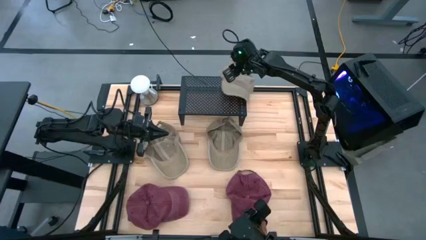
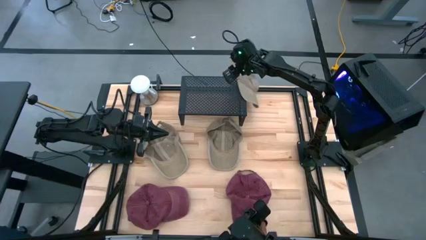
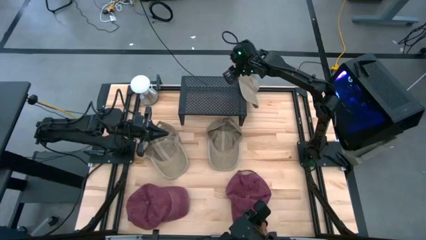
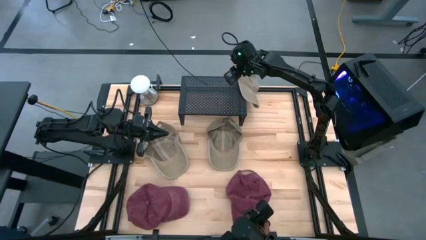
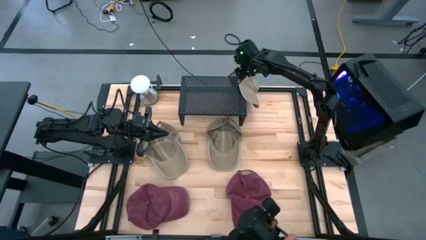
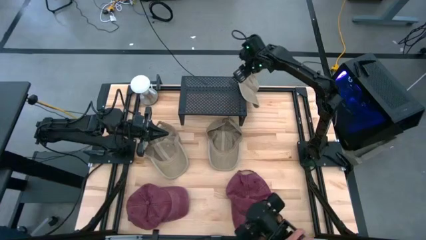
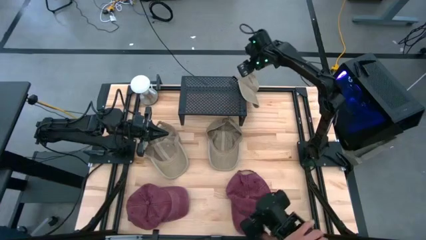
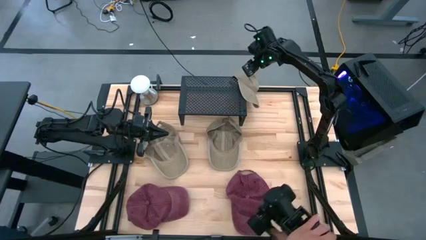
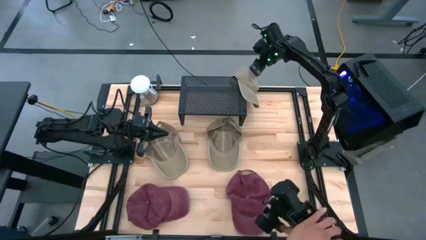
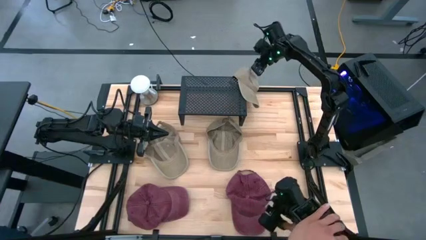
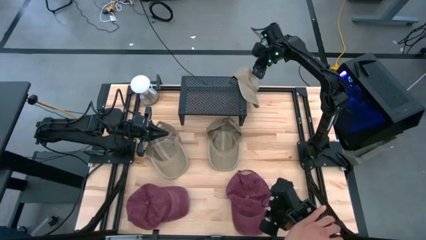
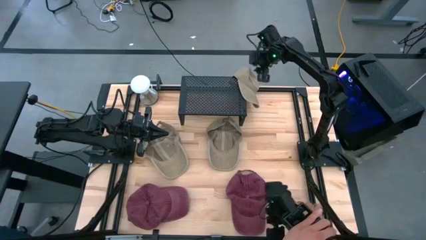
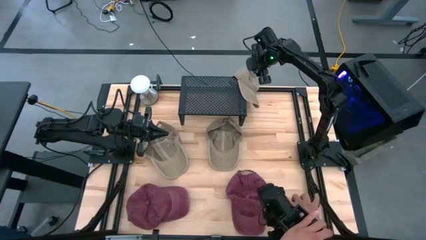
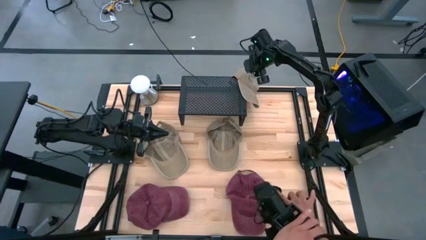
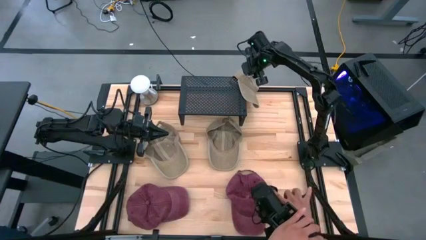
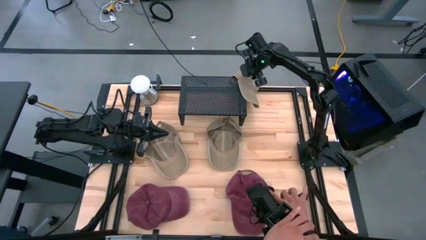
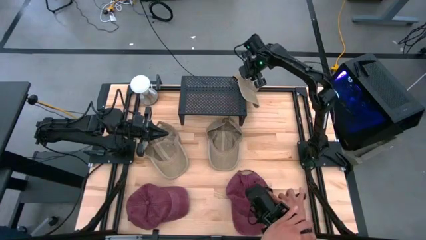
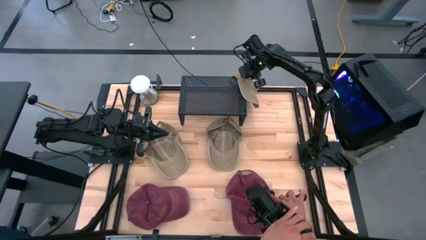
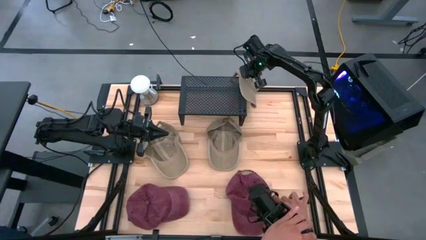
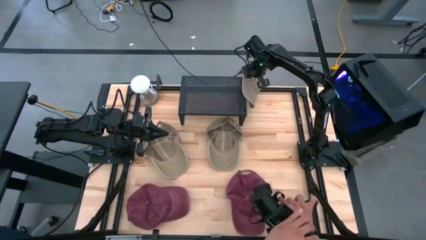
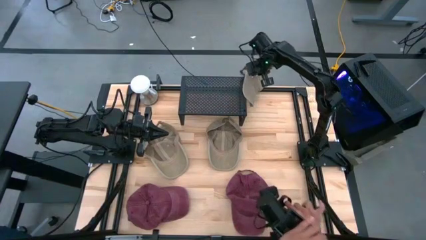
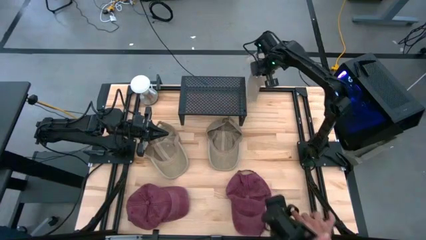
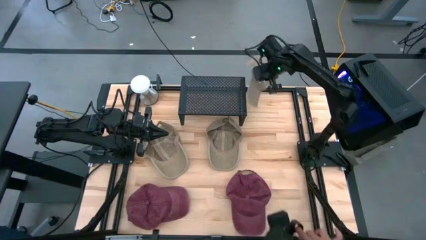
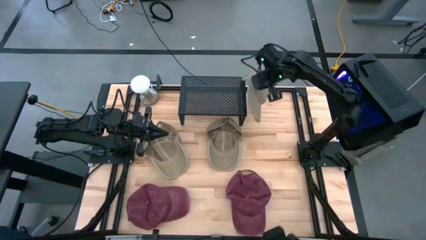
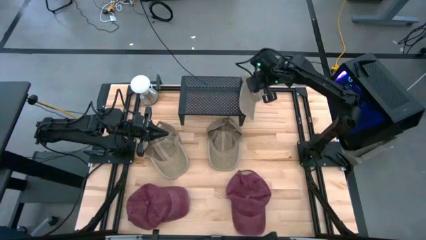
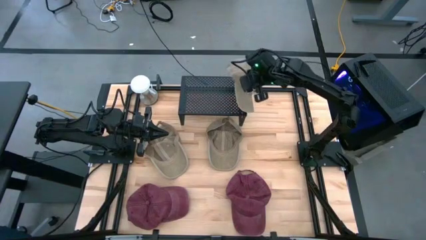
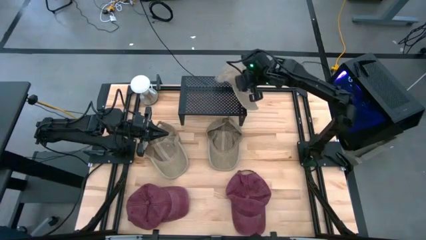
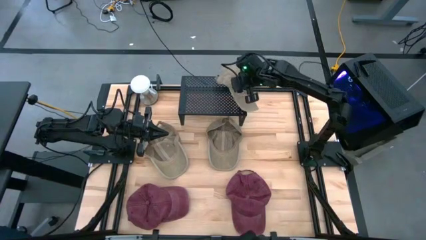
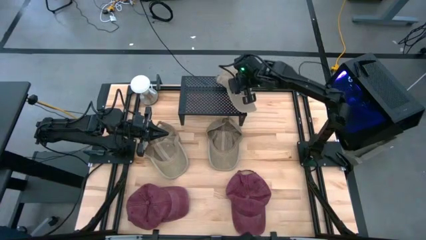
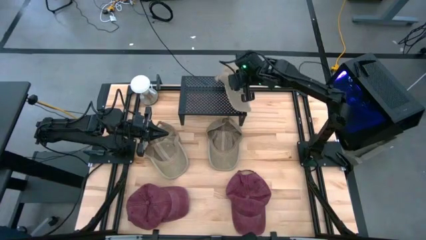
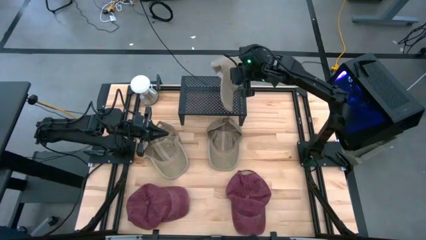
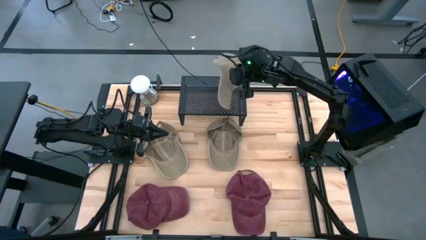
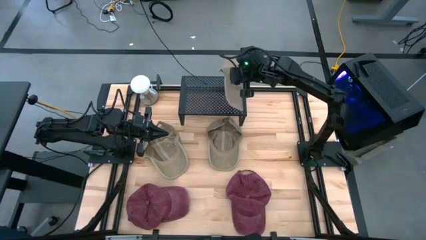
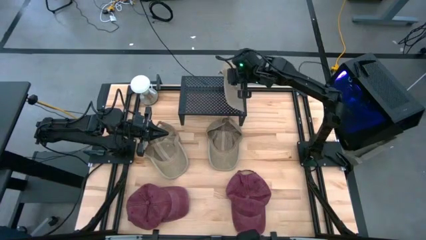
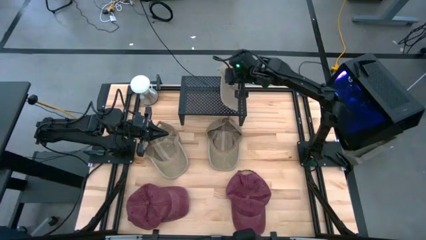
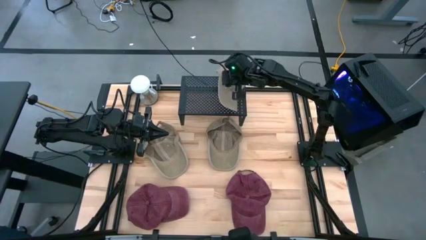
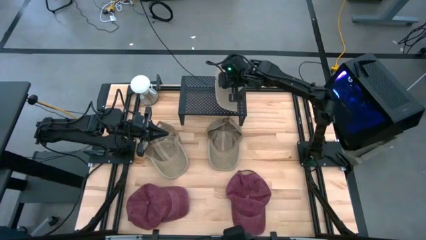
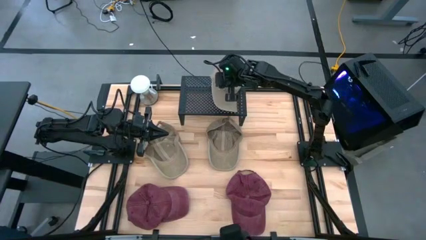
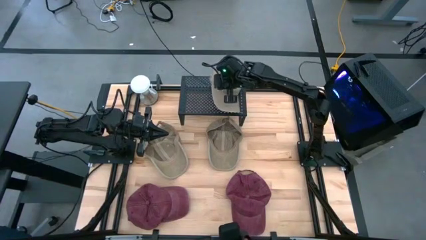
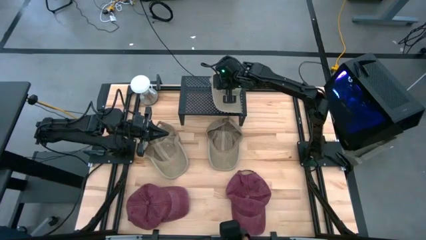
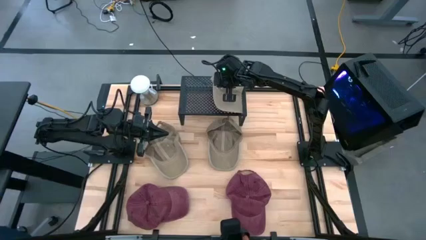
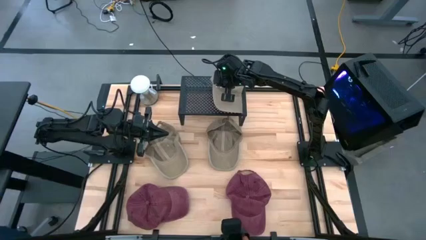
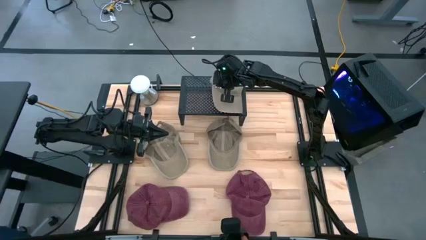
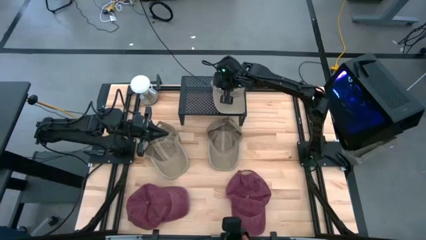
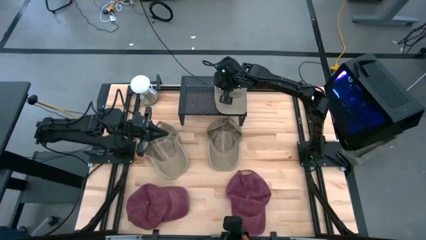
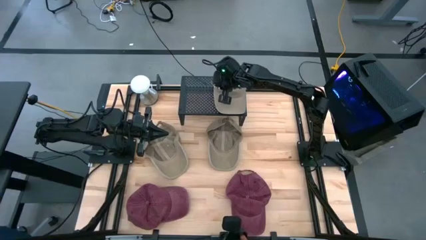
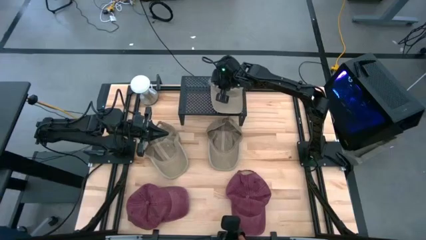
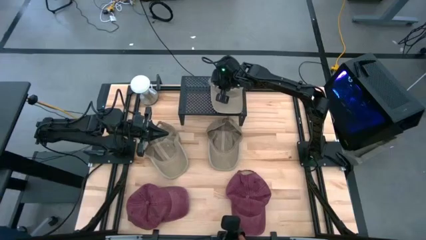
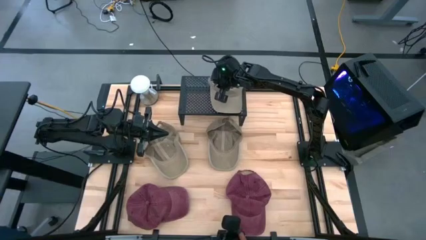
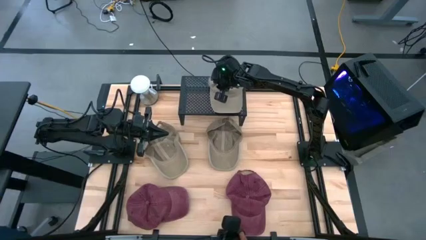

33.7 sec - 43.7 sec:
Task: Pick & Place hat
Put the right brown cap on the shelf
